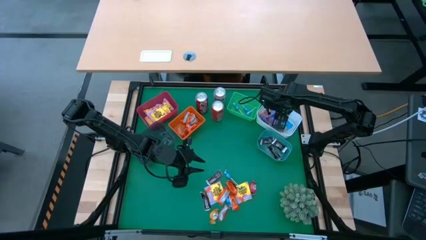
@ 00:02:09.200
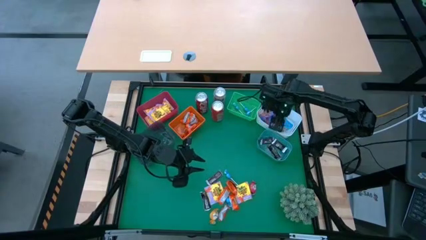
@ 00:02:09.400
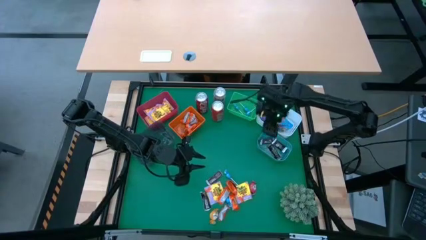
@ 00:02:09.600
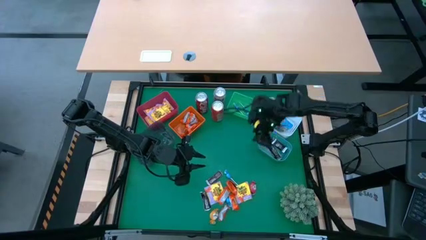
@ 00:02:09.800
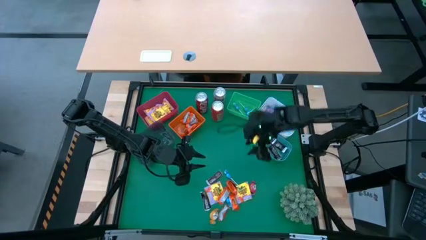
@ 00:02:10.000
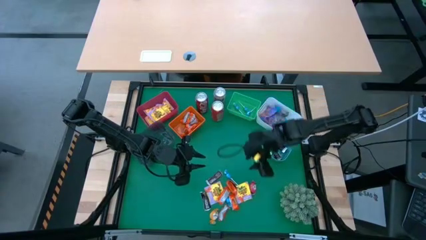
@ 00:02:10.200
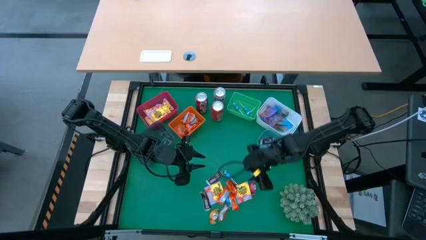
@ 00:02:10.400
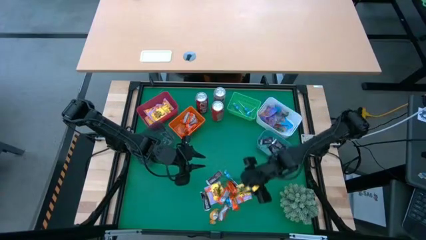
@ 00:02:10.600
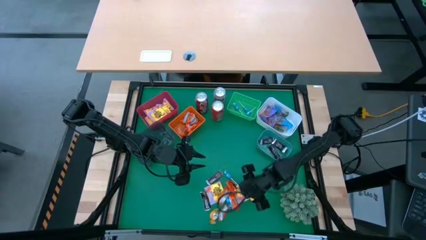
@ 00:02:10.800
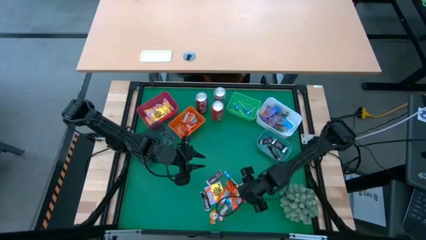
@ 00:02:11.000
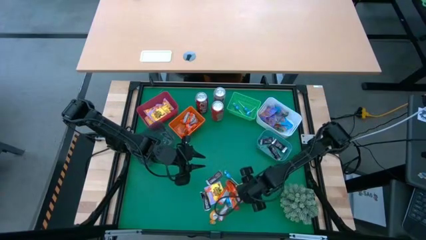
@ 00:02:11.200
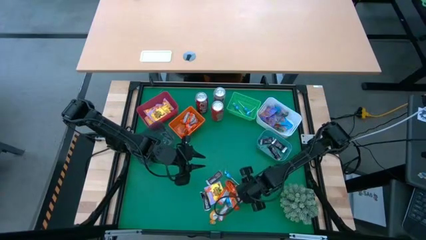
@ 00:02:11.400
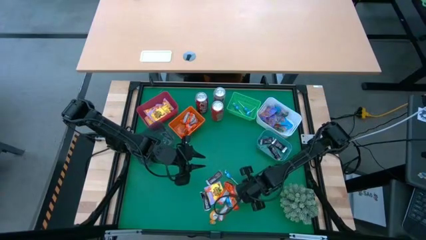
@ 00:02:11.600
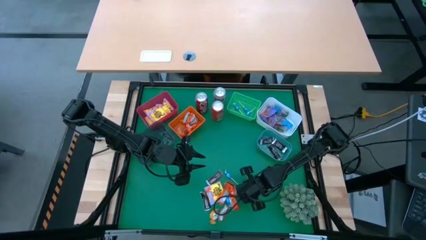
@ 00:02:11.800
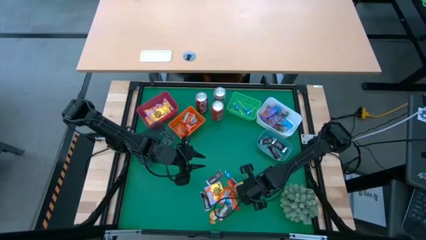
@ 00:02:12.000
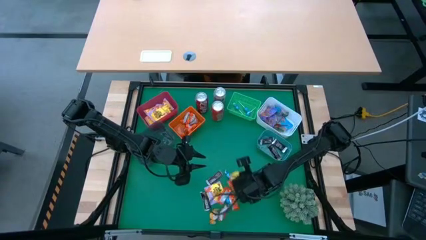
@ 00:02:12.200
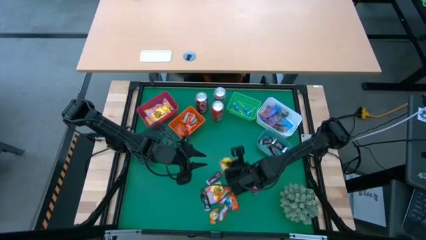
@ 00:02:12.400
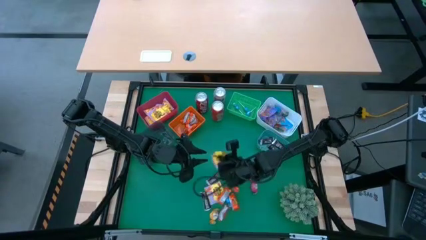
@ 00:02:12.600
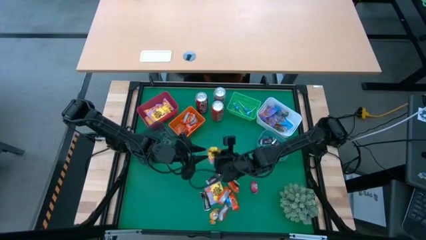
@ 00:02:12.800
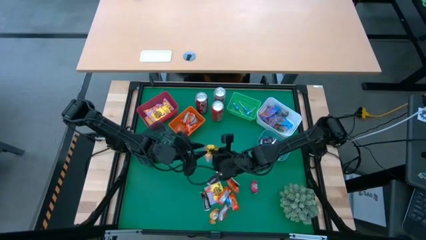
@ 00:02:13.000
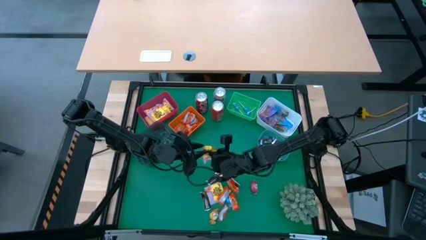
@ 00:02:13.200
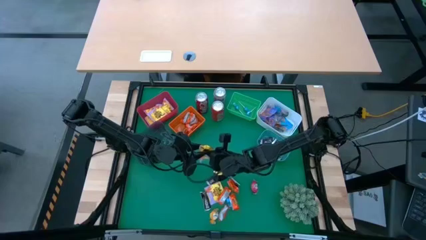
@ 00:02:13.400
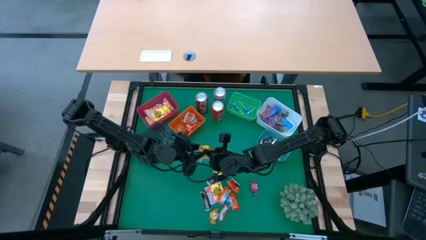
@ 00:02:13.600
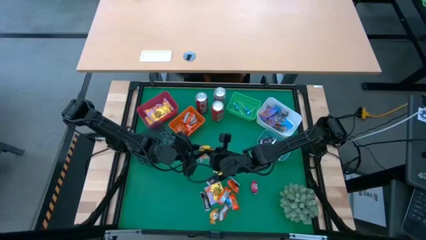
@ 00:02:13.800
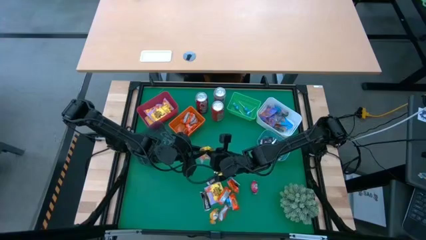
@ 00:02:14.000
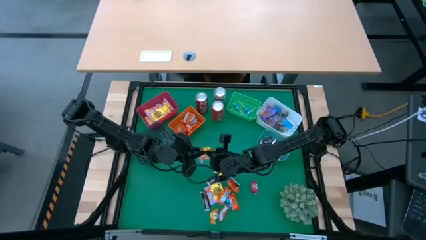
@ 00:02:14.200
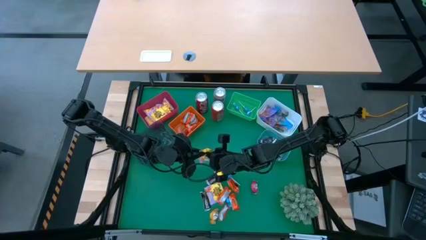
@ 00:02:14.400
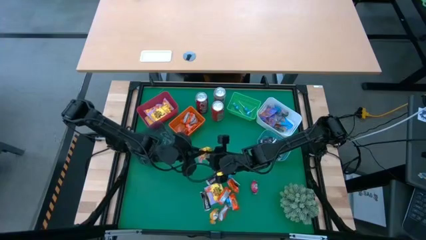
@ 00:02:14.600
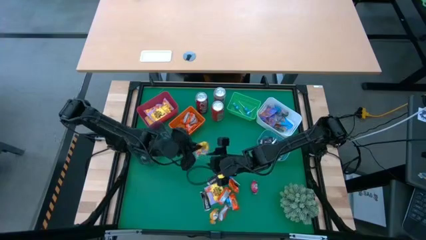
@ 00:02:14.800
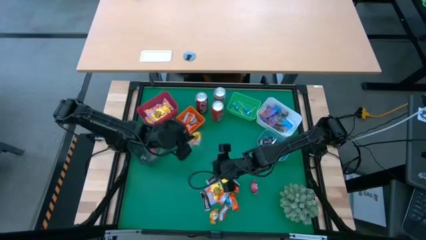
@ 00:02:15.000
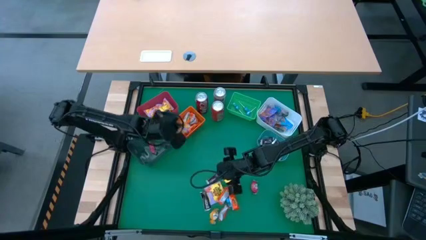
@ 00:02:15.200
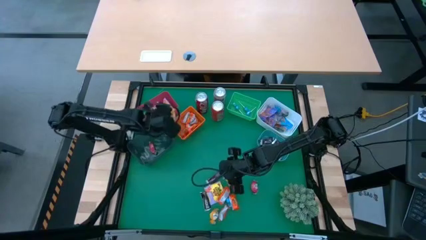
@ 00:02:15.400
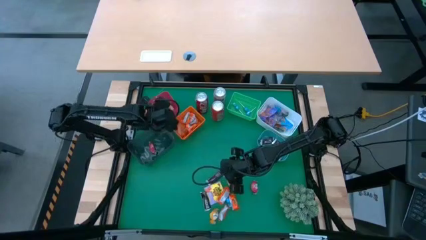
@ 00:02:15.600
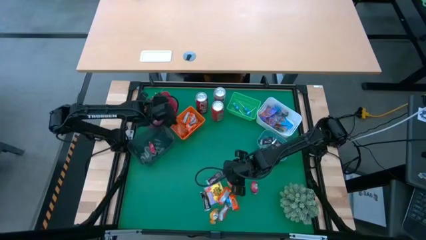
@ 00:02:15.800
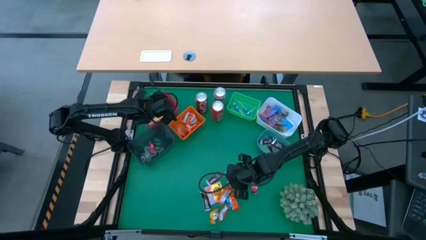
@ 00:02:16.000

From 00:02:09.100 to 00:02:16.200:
Task: Sort candy
Put the yellow candy into the red bin

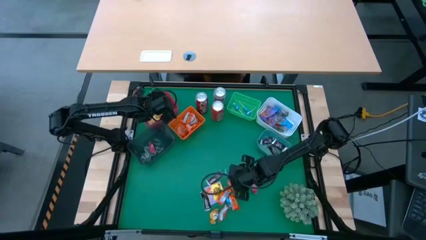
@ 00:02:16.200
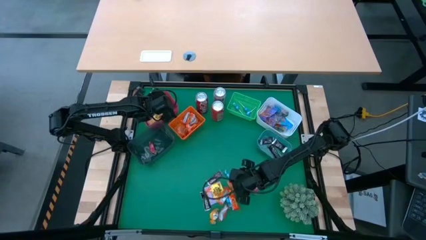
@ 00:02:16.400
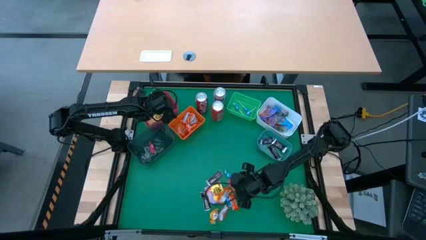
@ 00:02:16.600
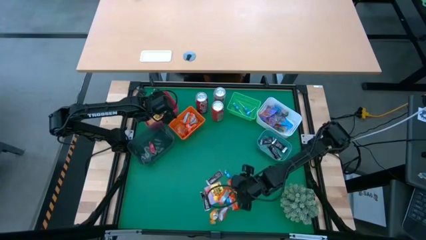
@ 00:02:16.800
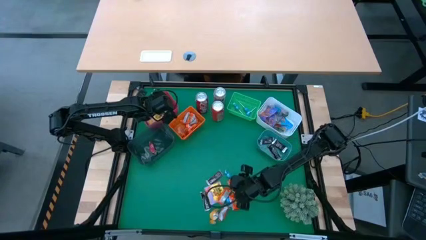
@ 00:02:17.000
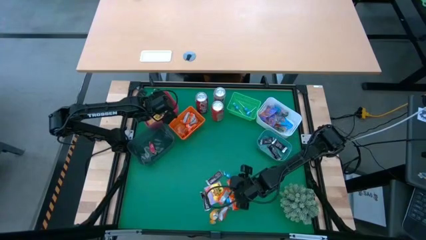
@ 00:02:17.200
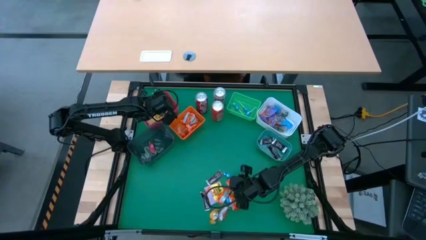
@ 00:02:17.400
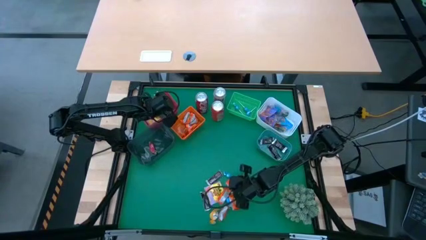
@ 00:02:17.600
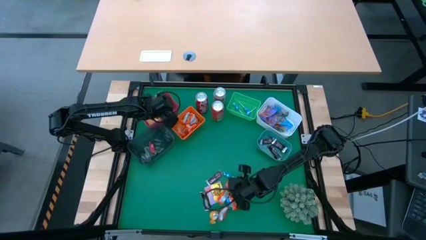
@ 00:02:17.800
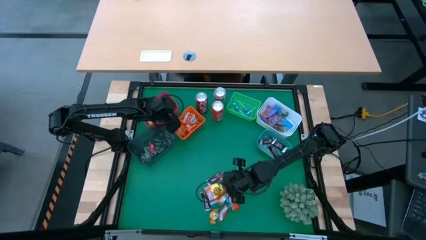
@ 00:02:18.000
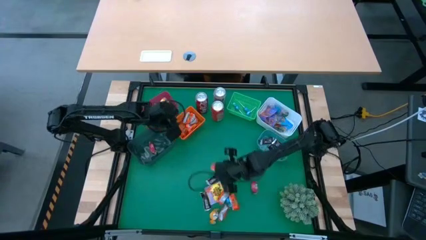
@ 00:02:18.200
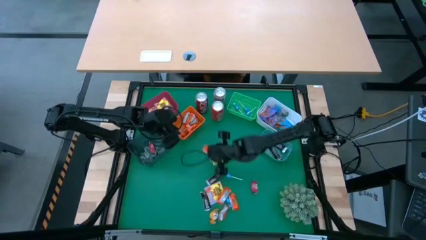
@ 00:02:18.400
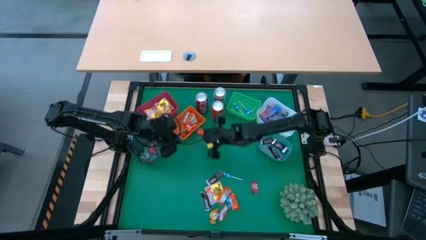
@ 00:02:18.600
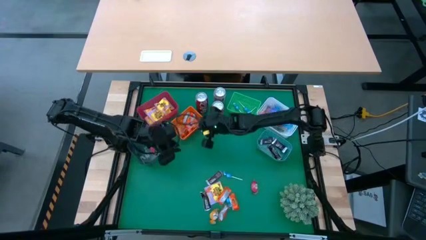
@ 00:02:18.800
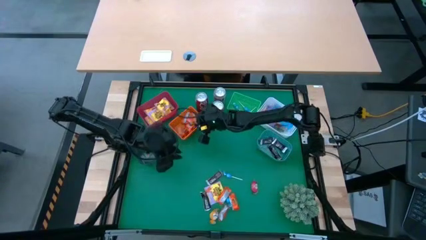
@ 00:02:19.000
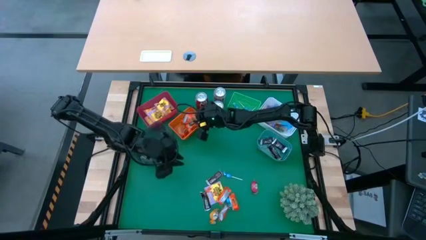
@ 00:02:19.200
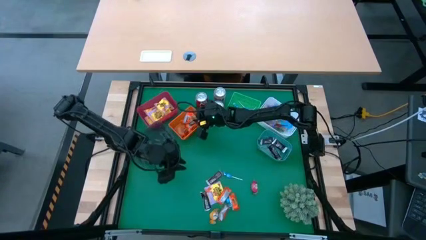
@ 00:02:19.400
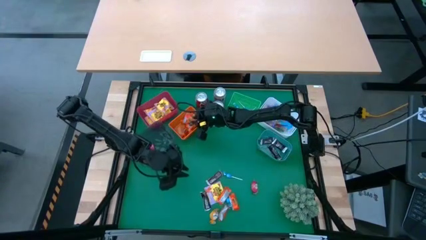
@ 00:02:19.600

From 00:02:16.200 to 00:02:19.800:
Put the orange chocolate into the orange bin

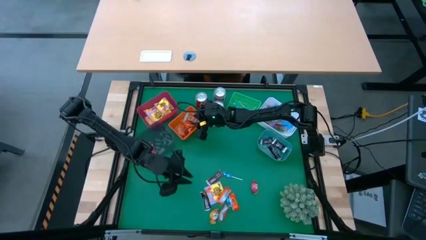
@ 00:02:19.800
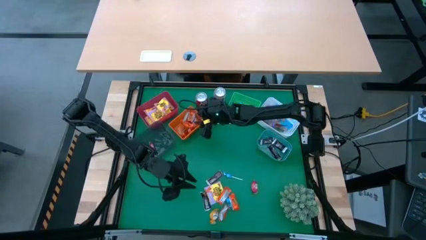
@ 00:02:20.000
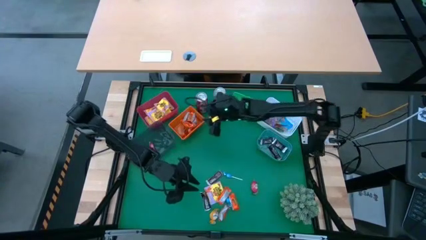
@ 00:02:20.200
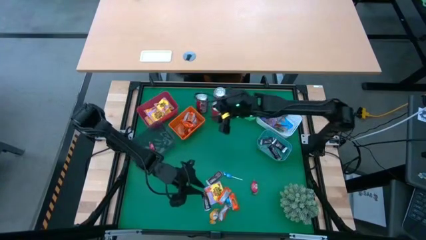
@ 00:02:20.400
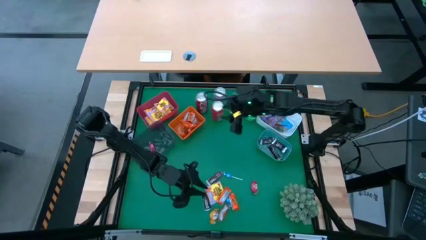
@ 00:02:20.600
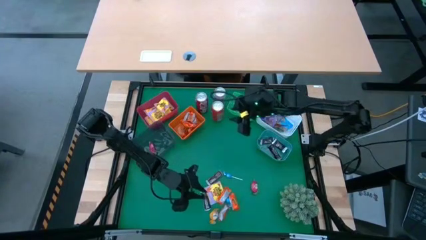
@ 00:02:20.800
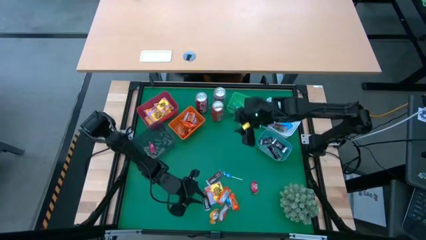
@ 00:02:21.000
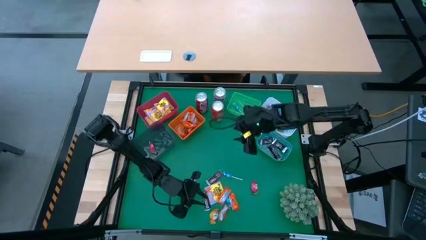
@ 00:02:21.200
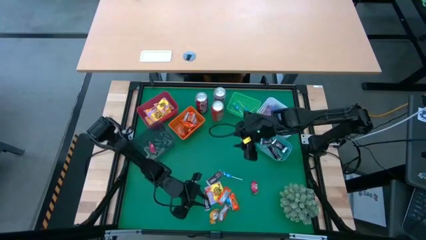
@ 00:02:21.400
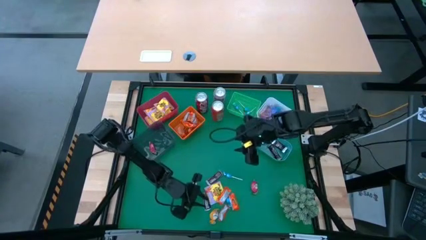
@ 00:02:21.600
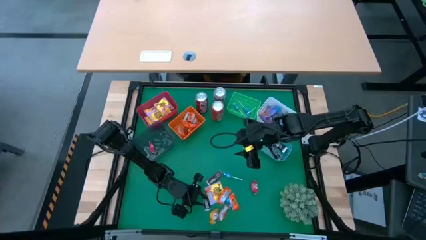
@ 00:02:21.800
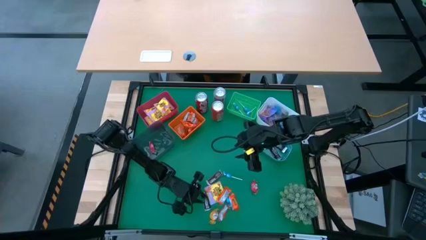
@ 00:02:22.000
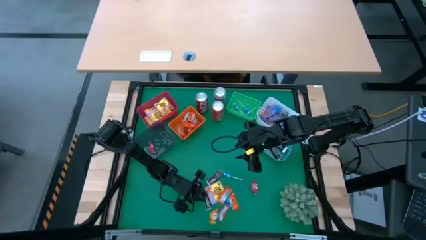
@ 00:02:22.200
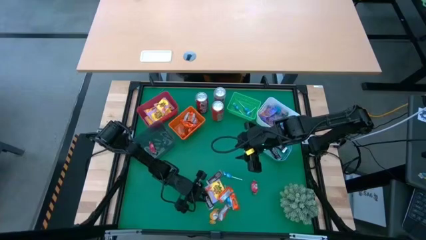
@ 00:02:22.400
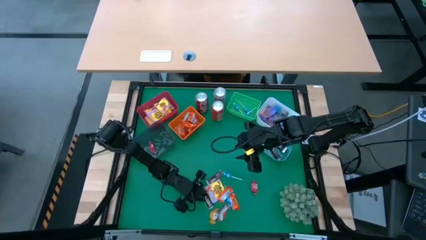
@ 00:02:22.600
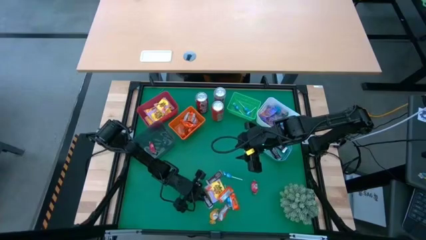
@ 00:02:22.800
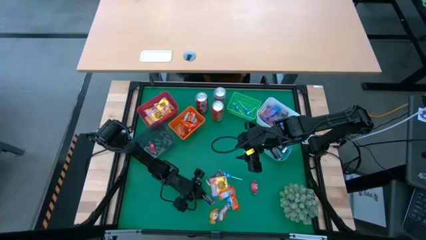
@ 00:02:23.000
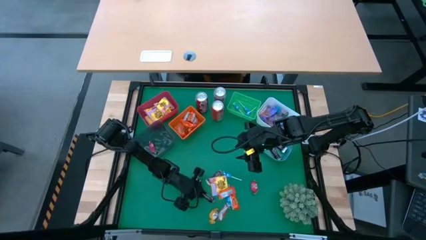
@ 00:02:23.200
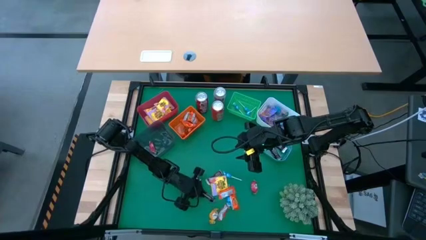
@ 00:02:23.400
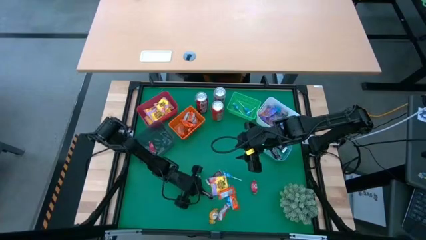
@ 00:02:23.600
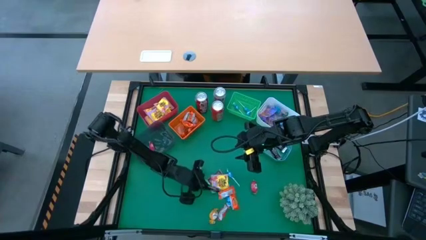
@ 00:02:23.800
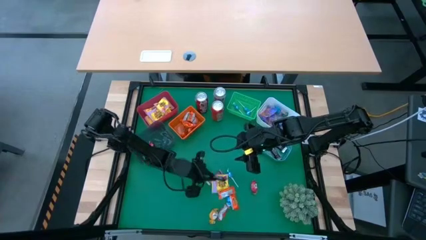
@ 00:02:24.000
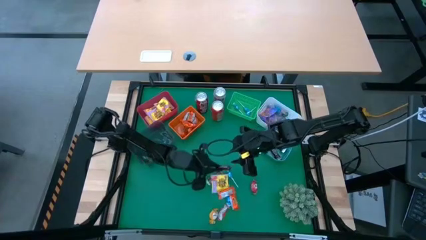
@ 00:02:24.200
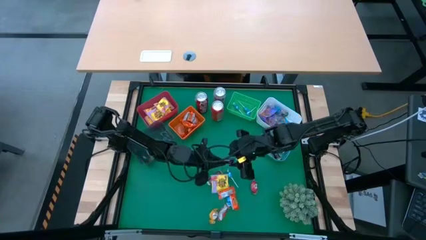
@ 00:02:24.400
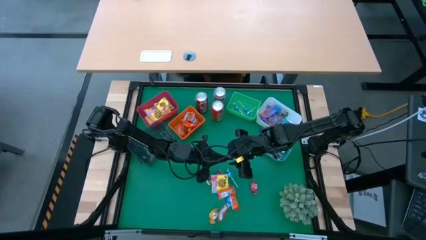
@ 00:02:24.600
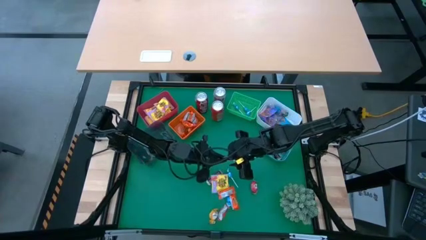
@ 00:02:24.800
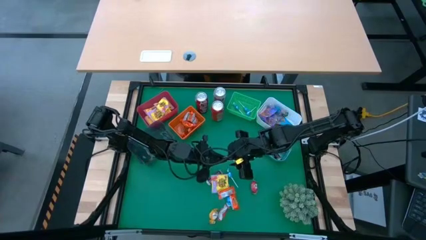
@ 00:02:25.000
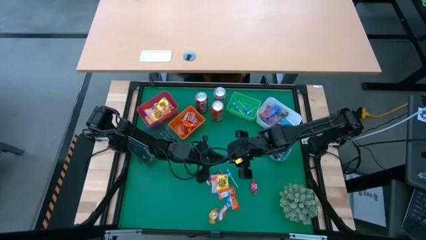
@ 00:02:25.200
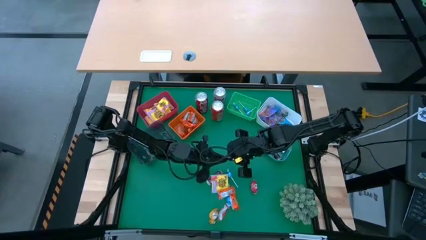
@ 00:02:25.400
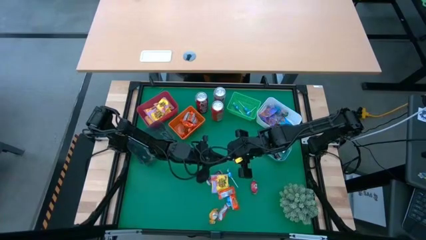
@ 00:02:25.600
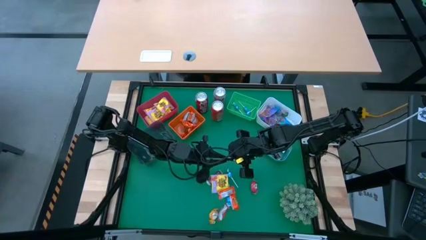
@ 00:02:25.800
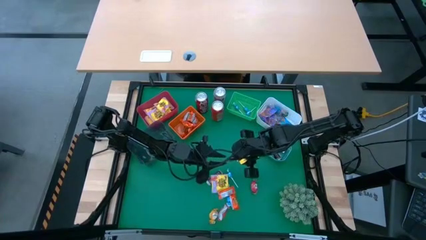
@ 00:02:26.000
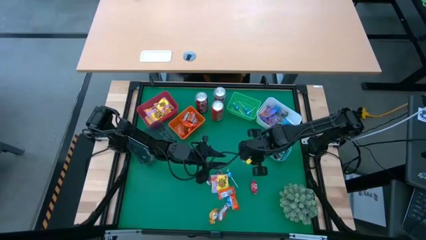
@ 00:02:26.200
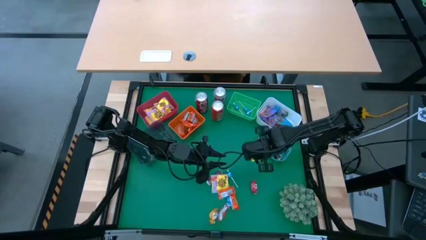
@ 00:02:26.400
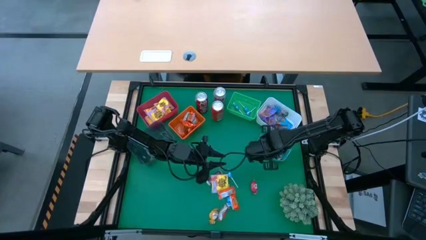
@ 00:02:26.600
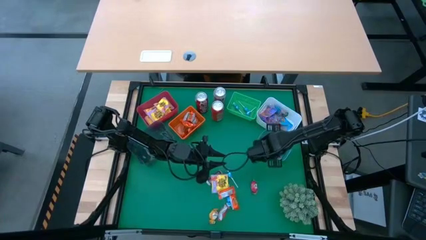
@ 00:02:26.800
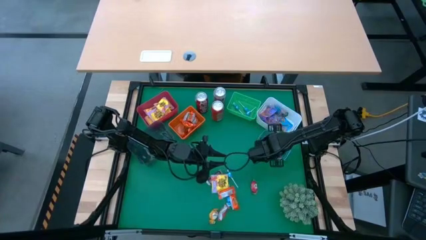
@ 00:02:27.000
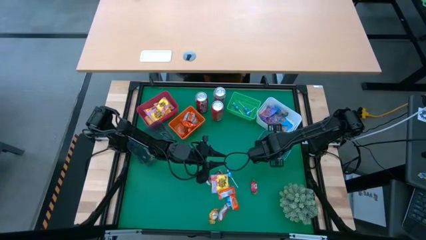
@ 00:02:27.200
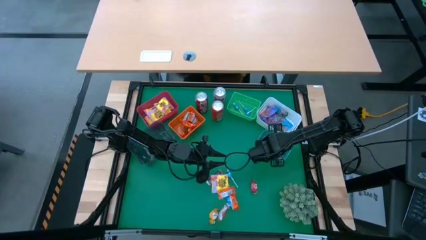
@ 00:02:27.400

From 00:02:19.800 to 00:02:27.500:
Put the brown chocolate into the blue bin
